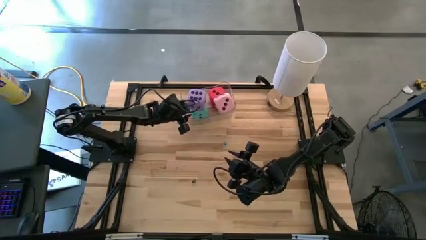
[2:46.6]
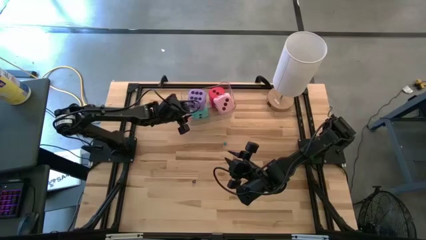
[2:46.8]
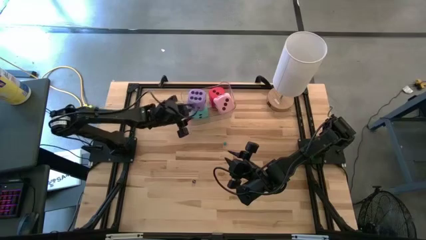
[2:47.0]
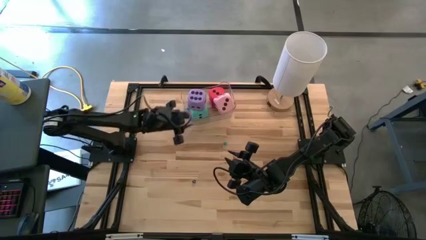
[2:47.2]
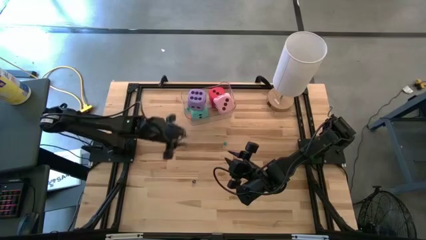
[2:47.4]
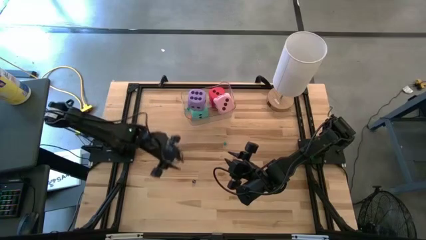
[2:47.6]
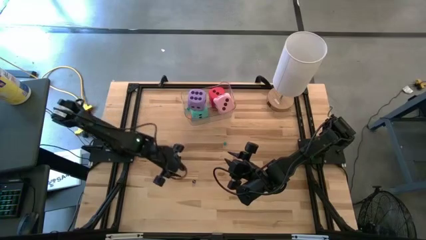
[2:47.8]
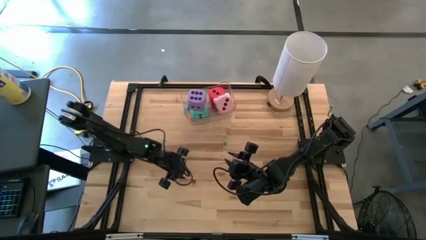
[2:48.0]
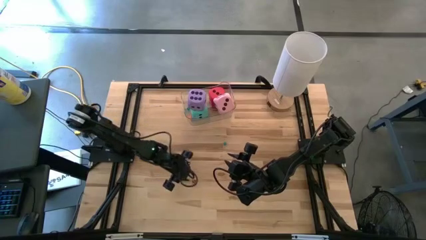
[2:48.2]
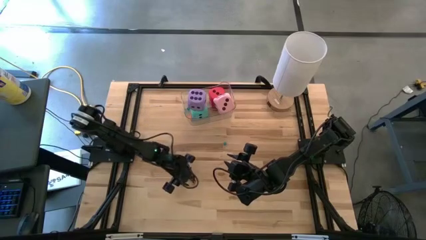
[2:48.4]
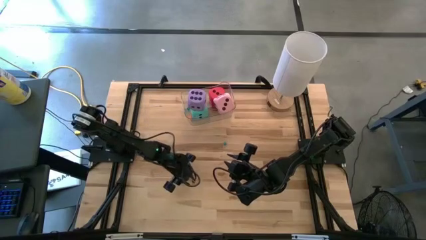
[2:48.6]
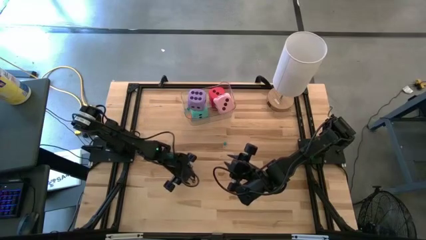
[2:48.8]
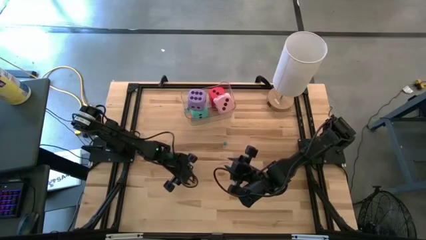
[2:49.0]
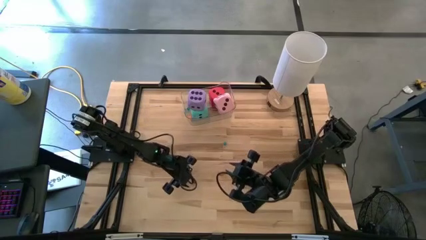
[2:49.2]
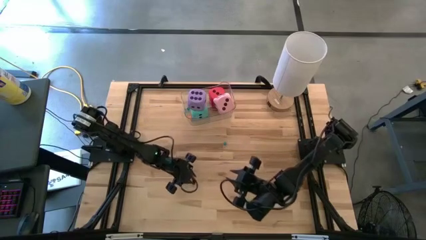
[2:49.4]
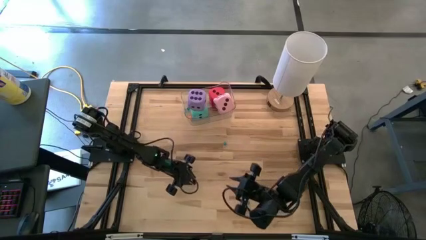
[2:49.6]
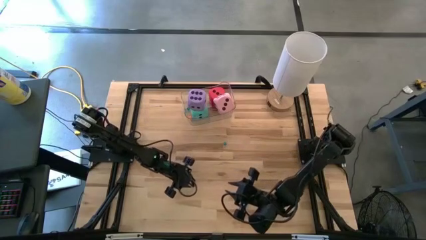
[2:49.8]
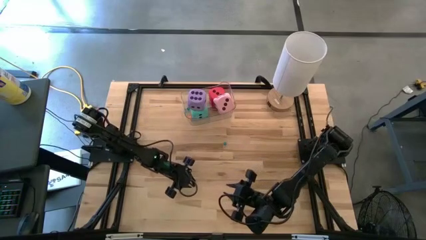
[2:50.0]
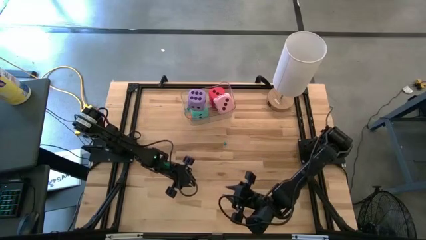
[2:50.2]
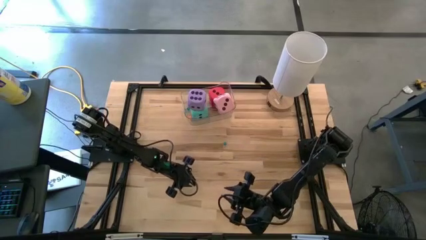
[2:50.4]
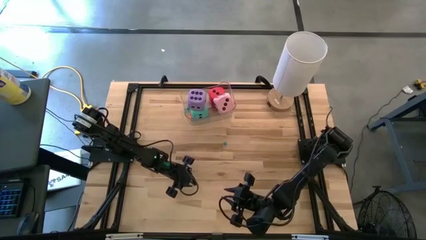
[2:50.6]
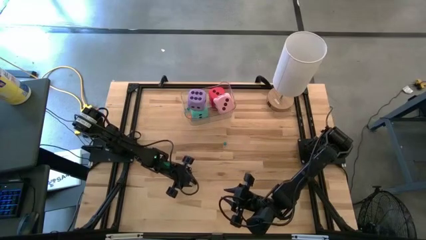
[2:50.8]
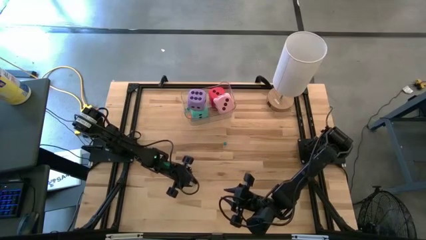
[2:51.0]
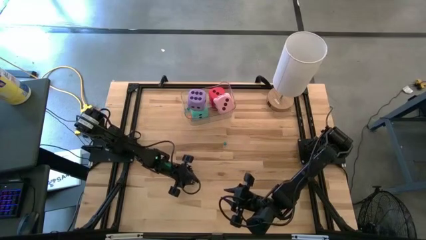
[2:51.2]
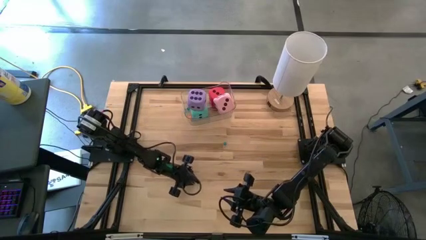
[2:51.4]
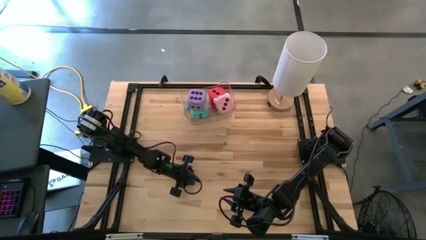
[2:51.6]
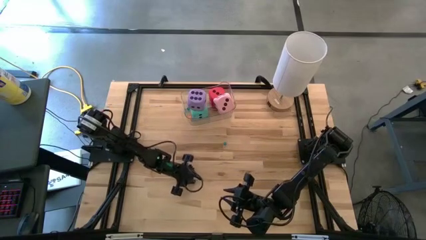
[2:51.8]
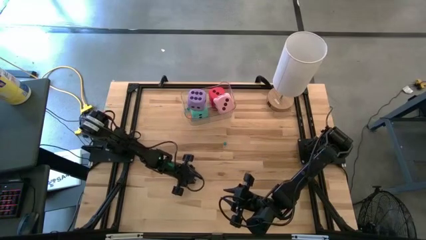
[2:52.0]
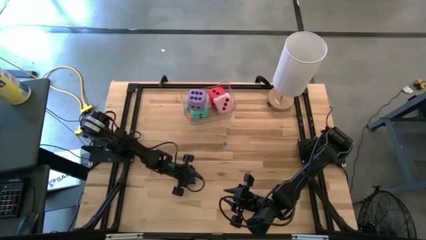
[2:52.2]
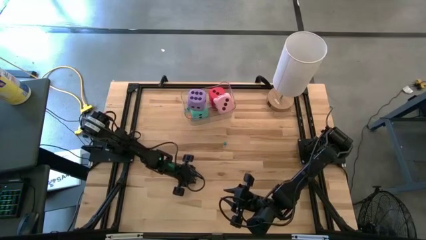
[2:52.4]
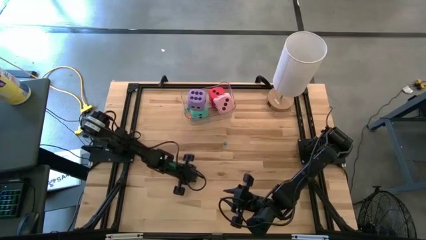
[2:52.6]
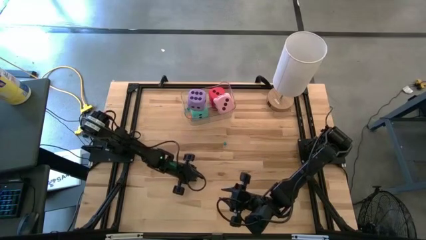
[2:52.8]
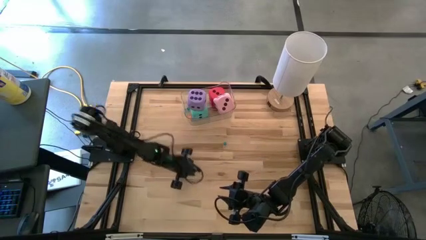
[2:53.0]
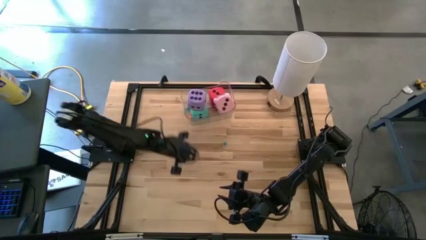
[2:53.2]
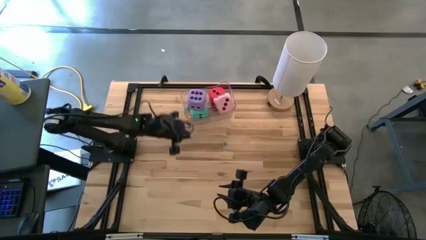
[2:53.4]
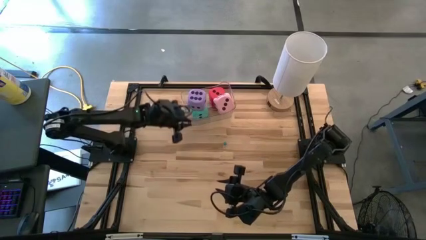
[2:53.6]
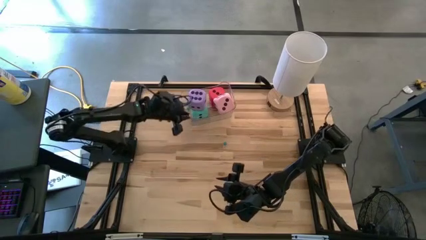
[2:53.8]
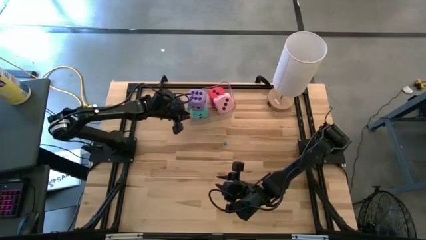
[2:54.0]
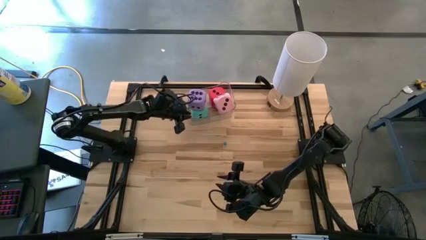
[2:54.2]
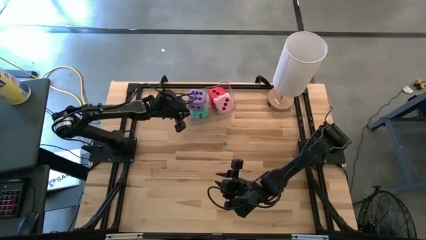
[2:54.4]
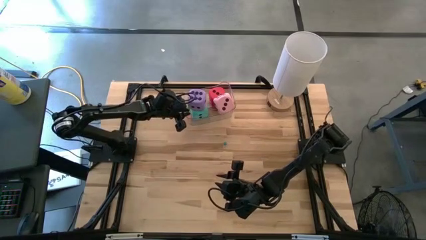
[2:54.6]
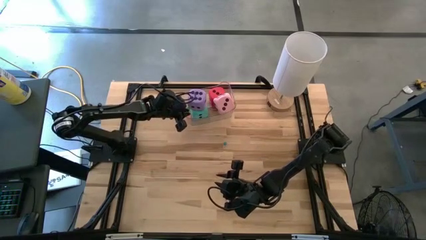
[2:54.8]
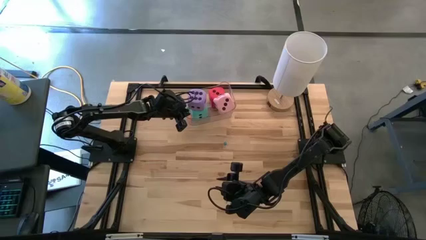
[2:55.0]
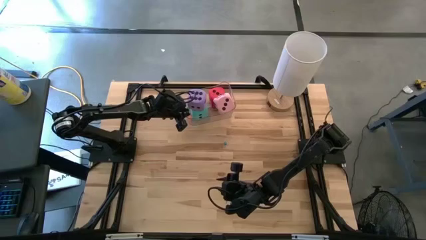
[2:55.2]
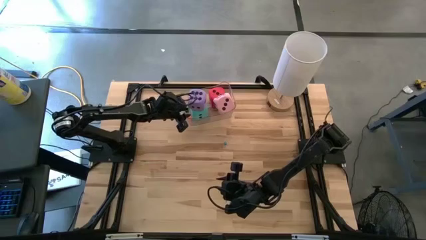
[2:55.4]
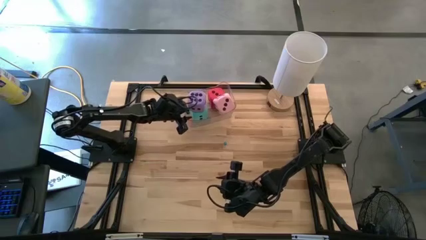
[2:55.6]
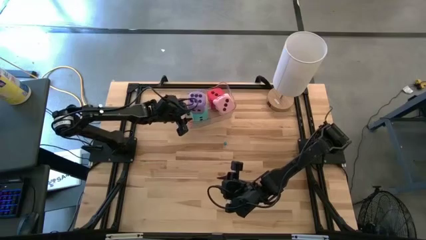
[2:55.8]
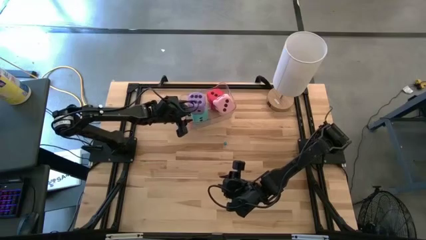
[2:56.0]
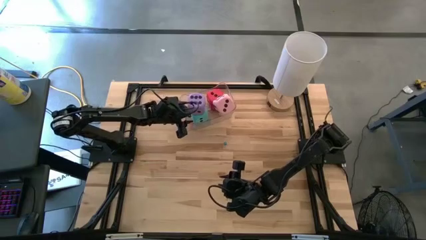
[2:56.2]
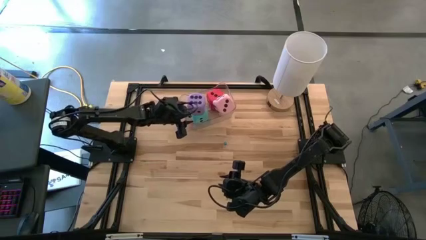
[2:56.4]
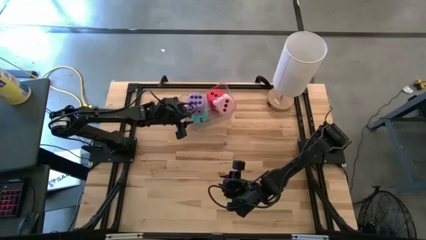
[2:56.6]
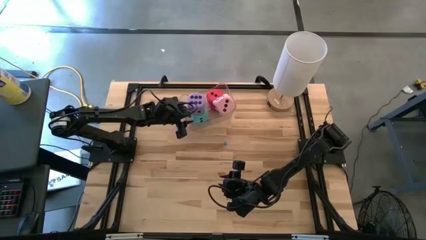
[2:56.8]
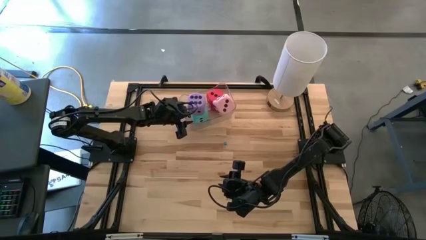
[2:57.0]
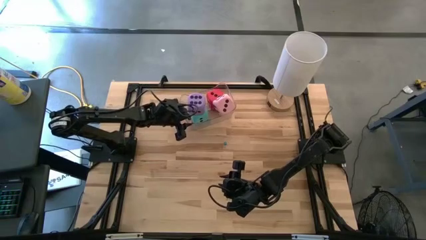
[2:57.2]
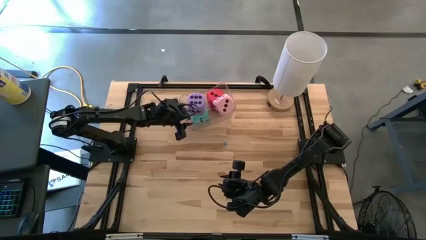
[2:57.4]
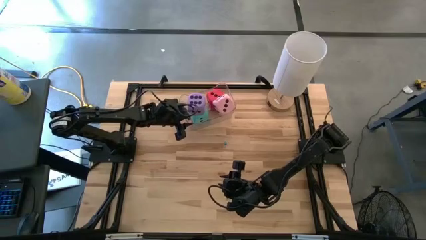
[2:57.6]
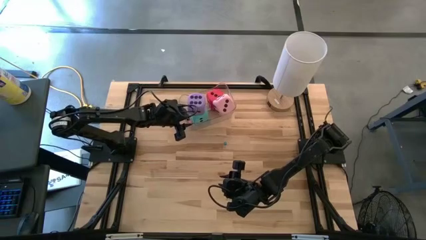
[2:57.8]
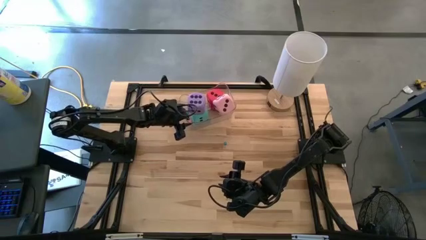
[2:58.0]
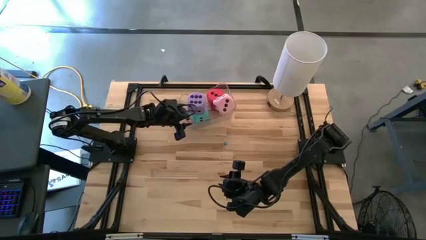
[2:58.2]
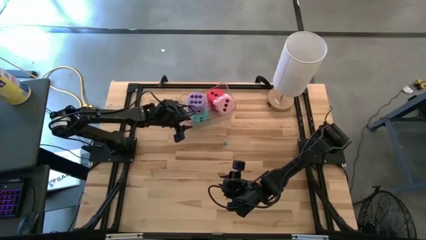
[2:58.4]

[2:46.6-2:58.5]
Task: Pick & Place Dice
Put the left small black dice in the transparent bin

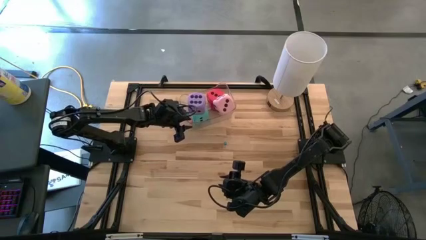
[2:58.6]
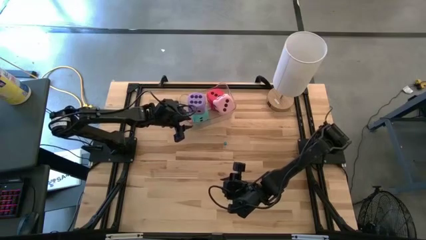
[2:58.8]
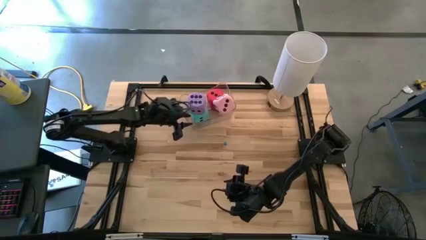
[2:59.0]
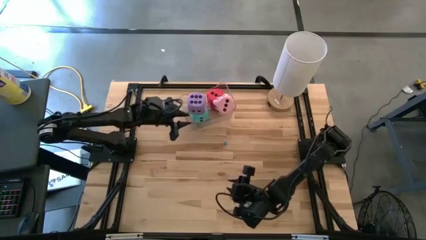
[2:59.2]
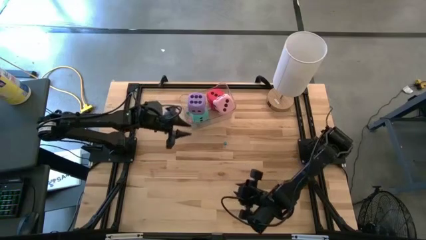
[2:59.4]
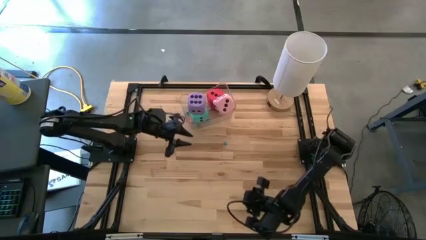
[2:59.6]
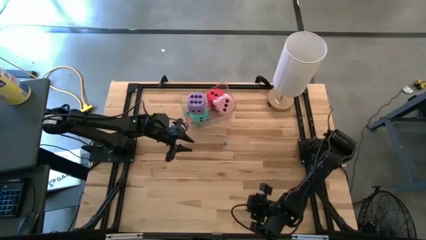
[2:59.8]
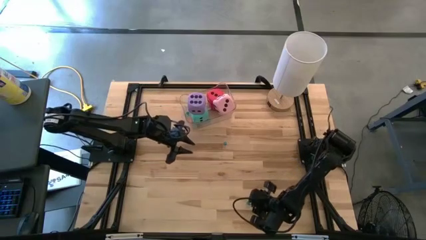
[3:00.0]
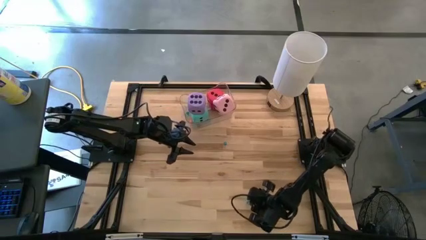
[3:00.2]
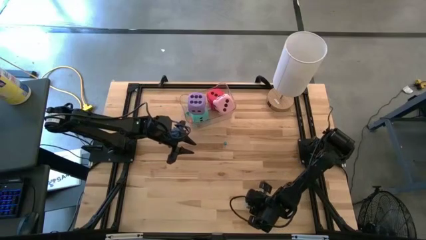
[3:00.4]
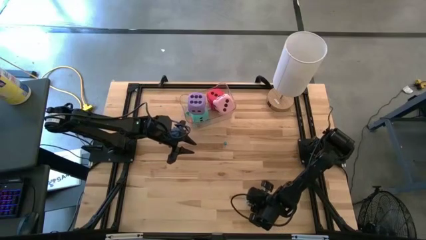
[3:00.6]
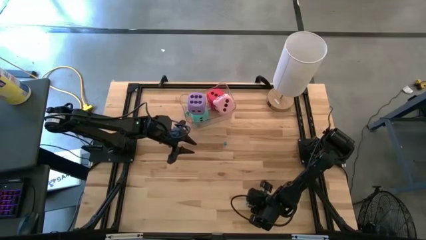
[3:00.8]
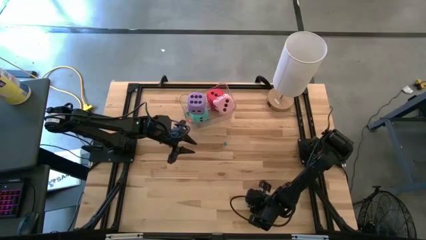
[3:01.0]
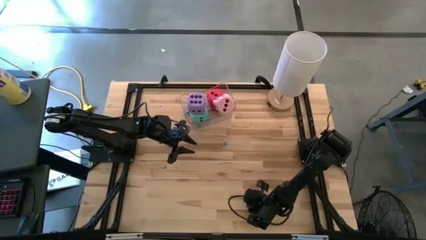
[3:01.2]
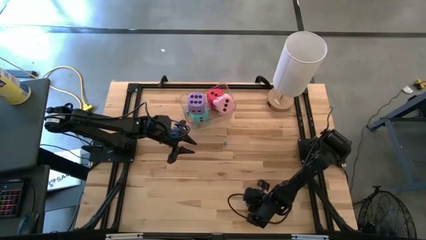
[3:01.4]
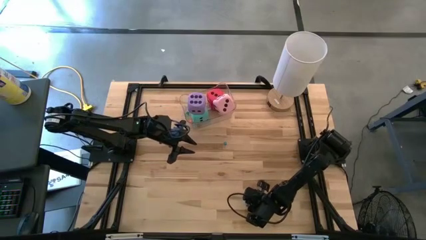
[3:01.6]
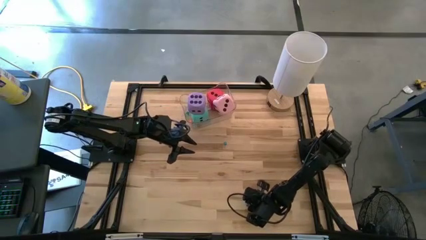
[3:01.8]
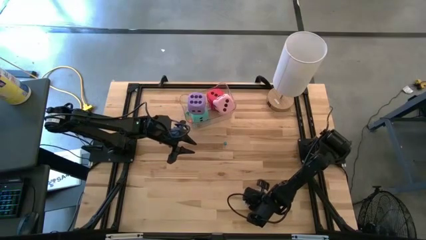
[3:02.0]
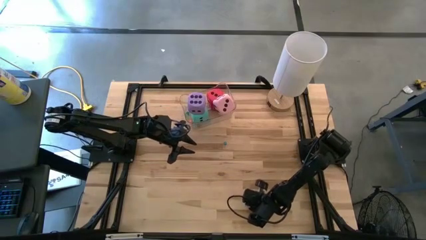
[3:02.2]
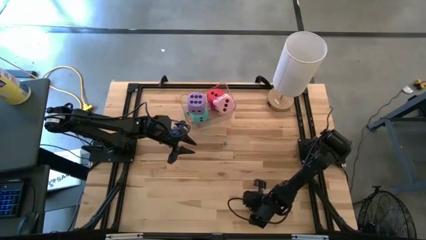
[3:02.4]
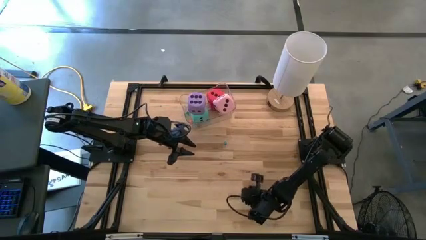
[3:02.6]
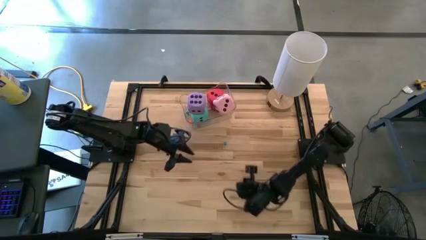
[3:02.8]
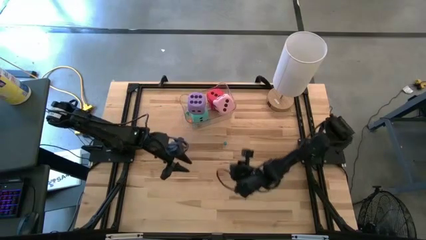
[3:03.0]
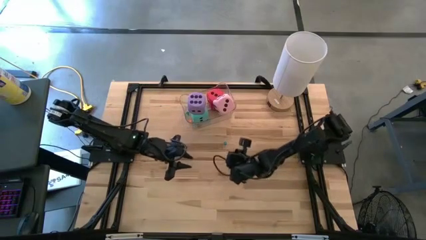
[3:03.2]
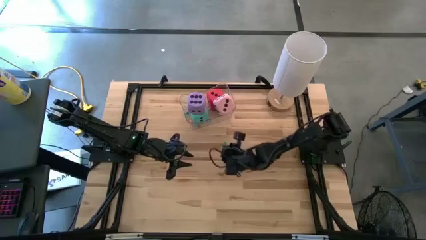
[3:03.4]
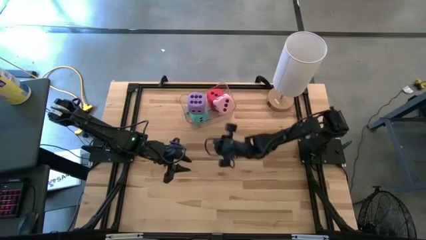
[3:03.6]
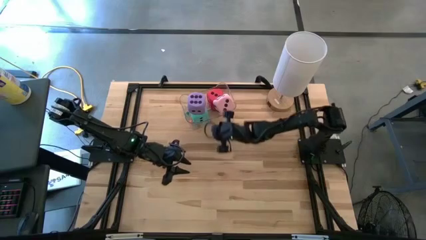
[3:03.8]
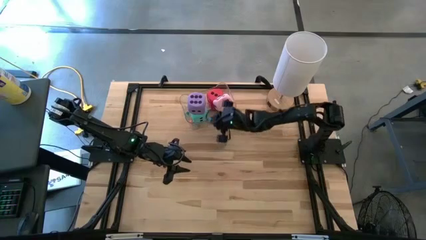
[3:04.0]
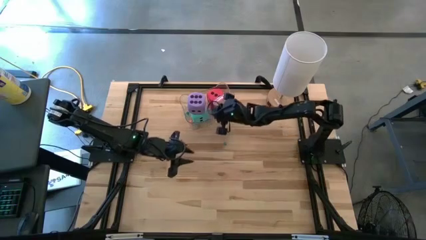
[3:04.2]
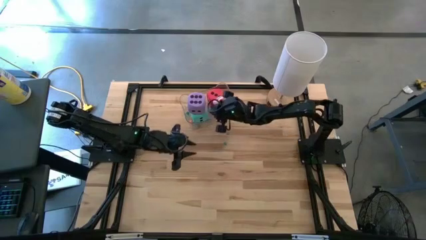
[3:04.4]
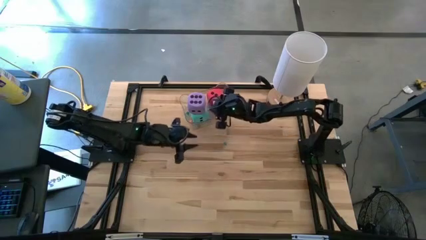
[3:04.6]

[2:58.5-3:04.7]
Put the bottom small light blue dice in the transparent bin
